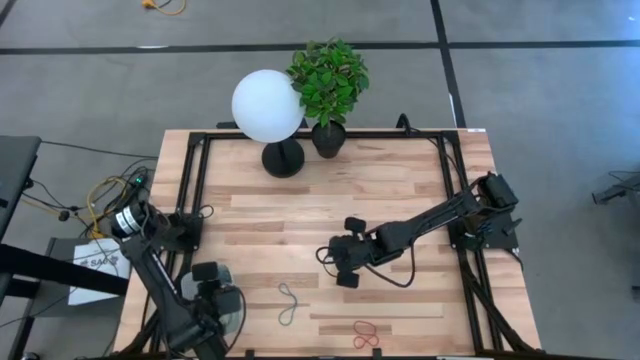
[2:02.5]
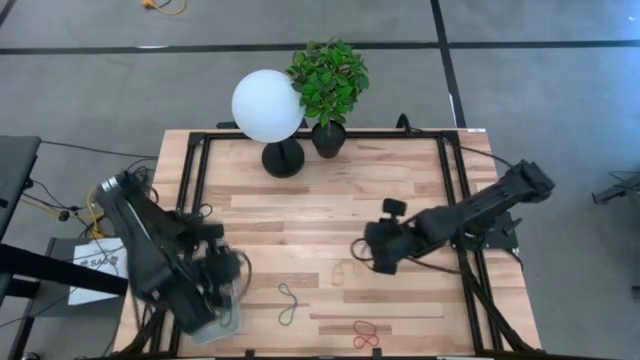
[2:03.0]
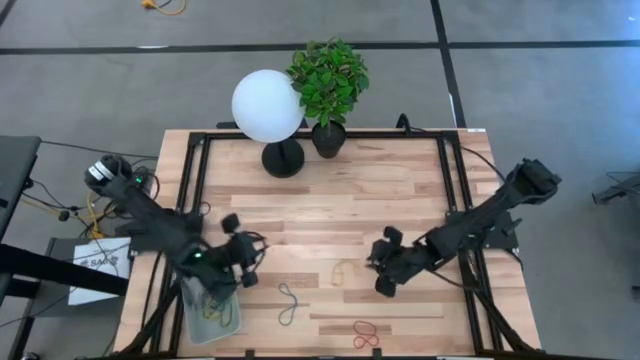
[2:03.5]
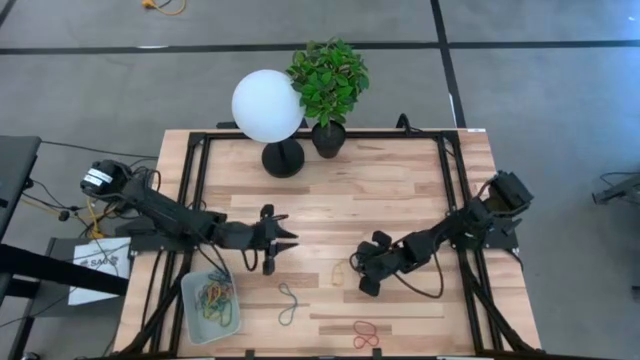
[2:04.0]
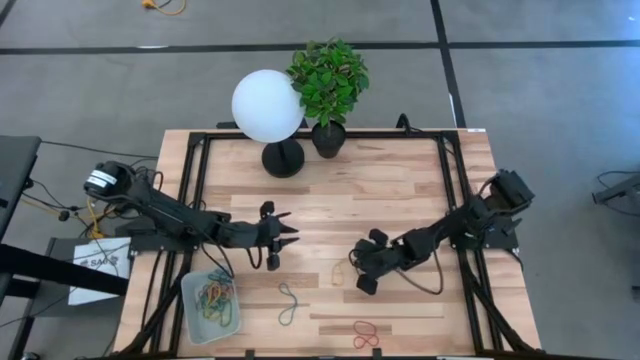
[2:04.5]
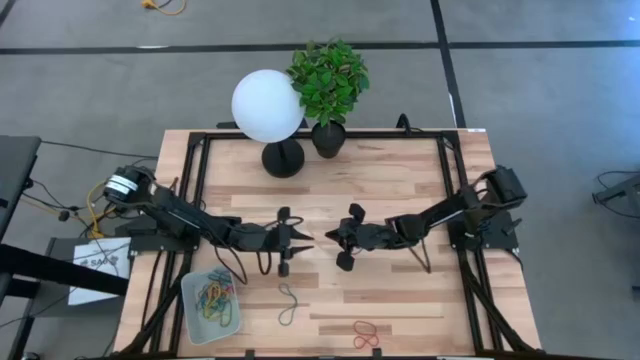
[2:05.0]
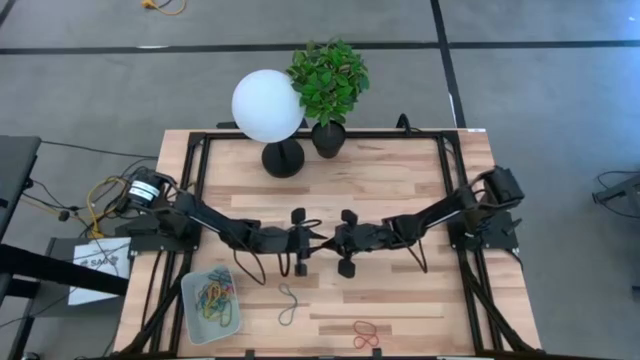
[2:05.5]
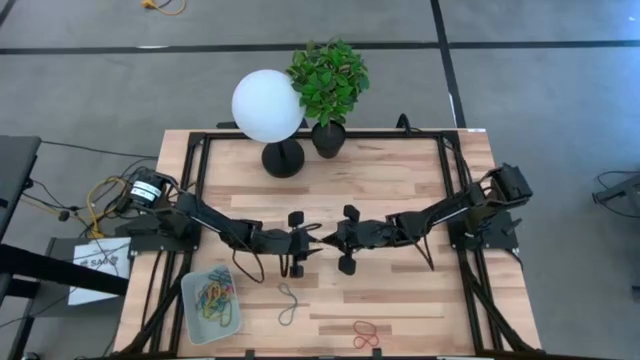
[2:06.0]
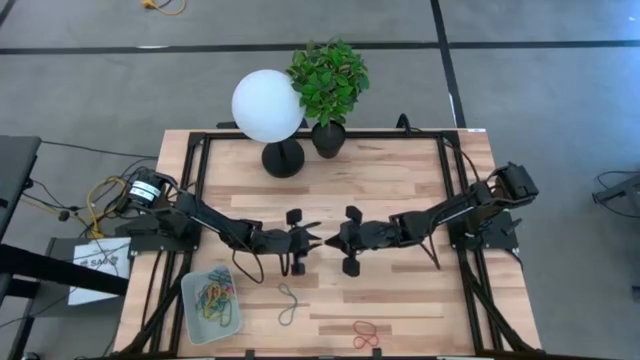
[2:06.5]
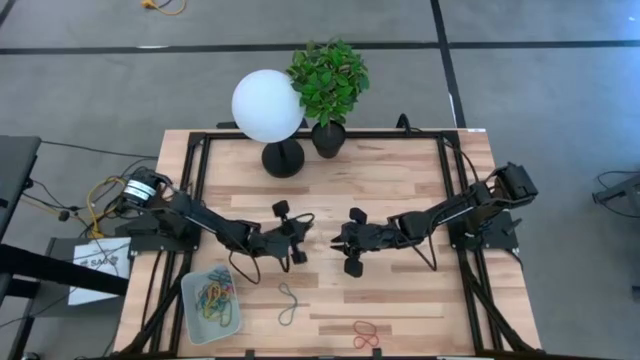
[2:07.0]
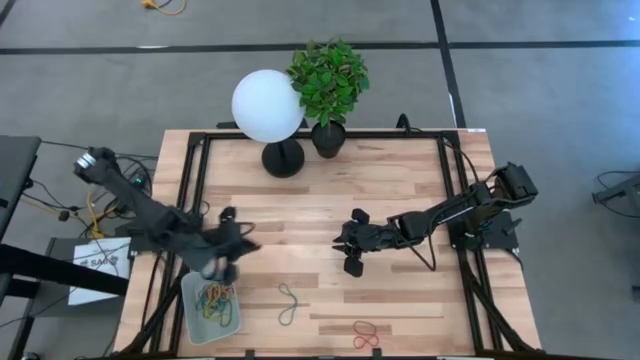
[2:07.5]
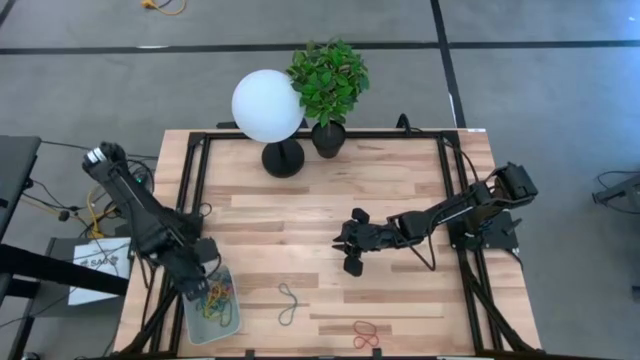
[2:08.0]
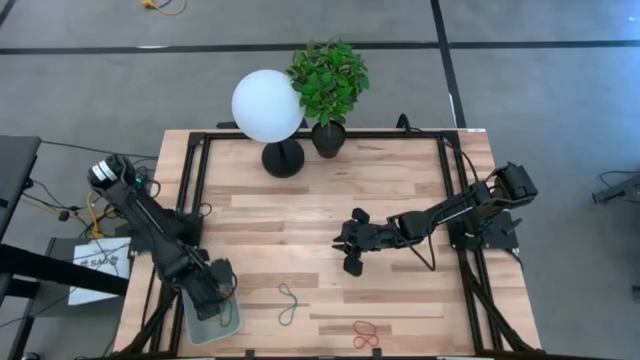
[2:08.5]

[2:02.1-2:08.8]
Task: Pick and place items into bin
Put the yellow rubber band into the gray bin

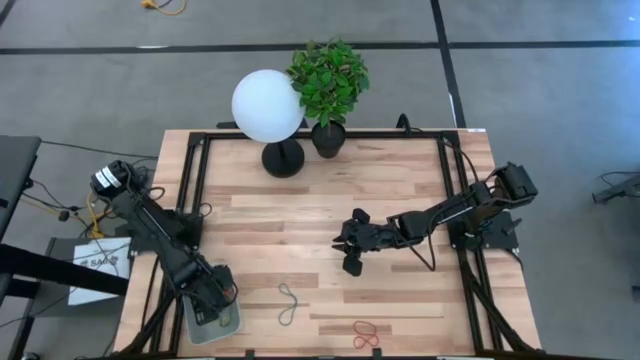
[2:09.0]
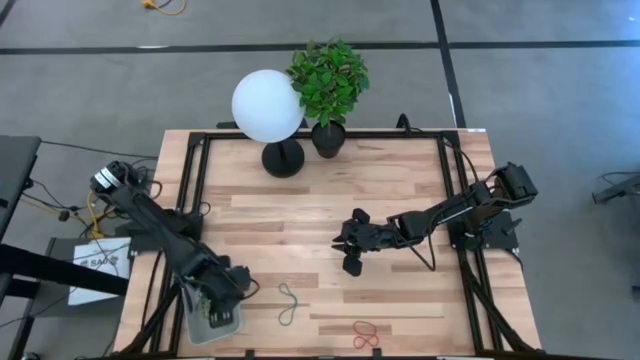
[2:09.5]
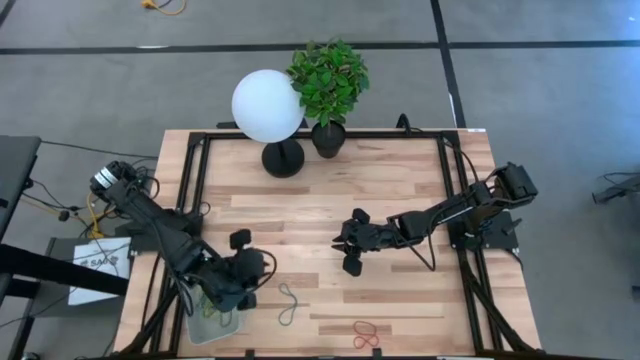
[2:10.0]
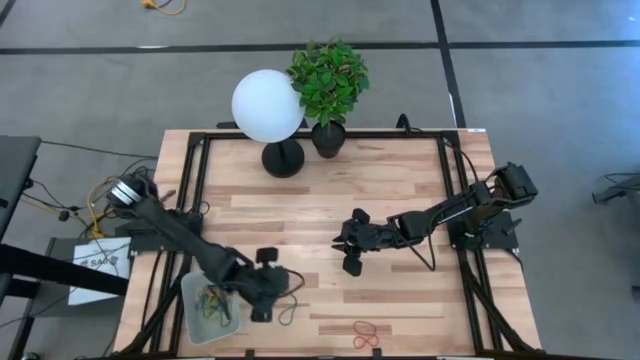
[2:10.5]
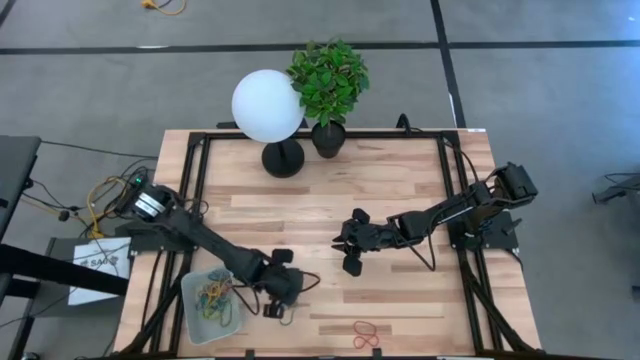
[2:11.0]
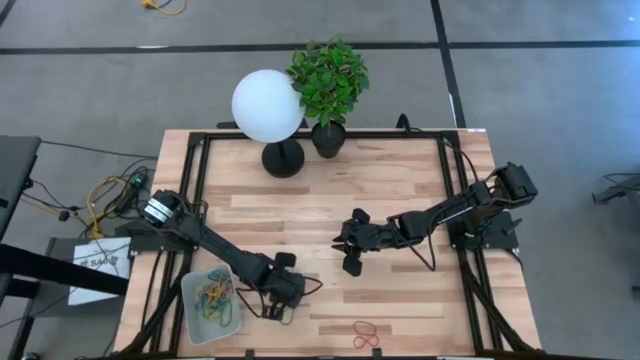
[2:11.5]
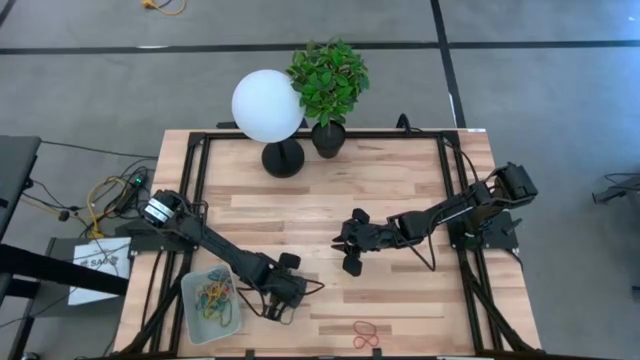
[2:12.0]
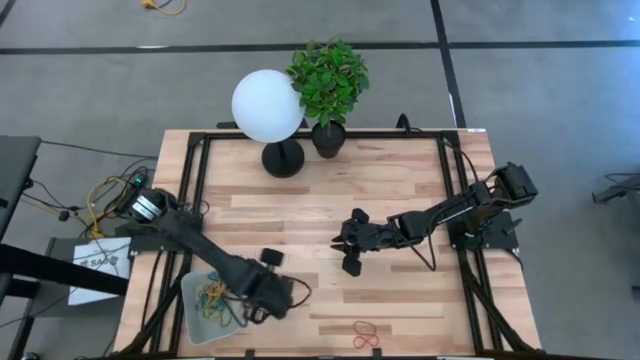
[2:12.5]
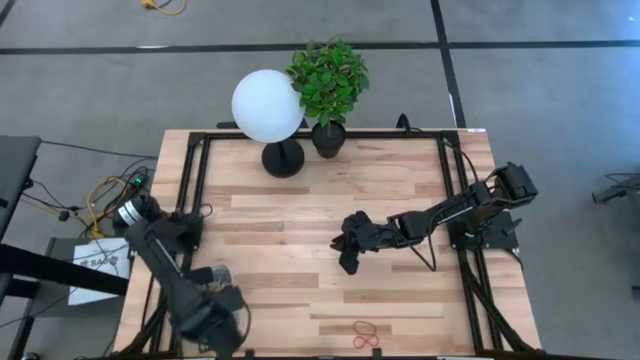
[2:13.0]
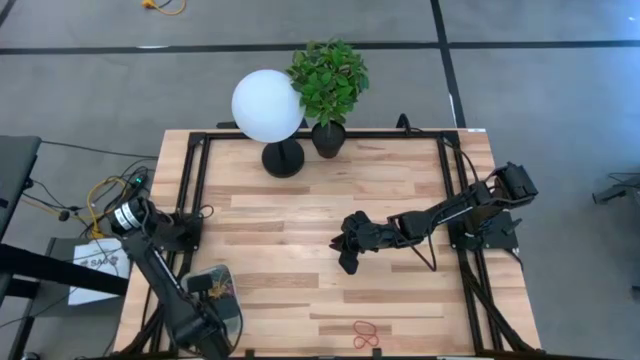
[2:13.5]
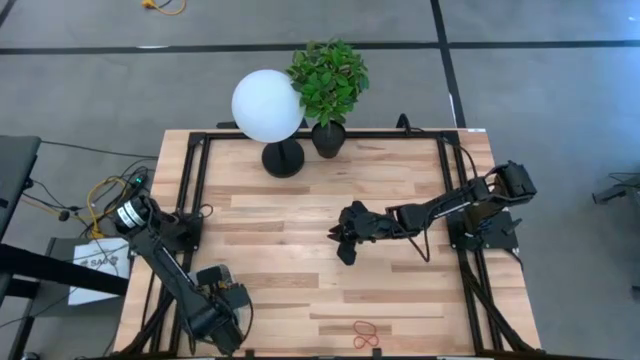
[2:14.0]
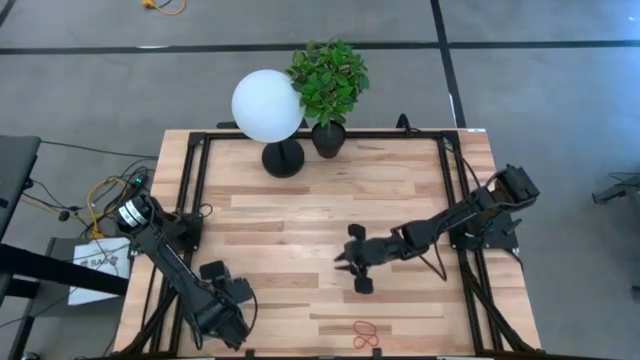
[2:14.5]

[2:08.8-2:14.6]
Put the blue rubber band into the gray bin

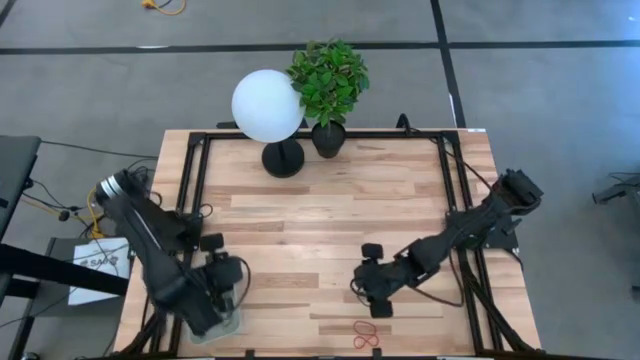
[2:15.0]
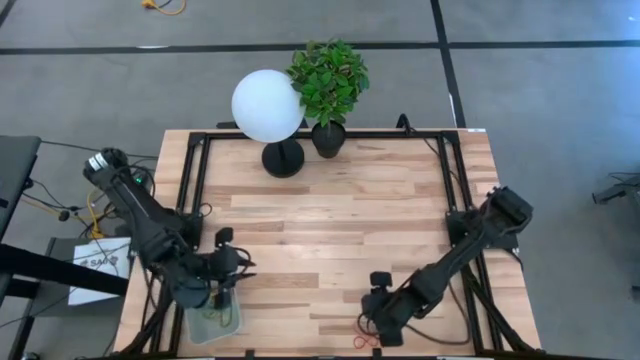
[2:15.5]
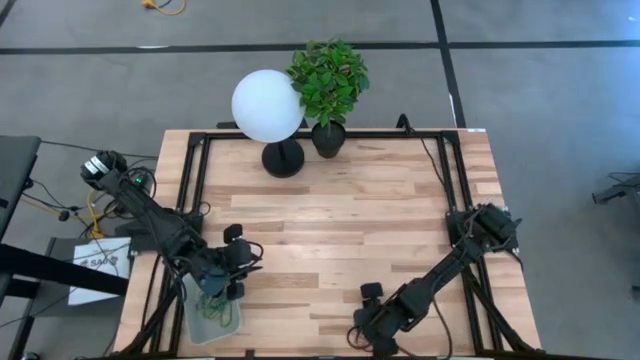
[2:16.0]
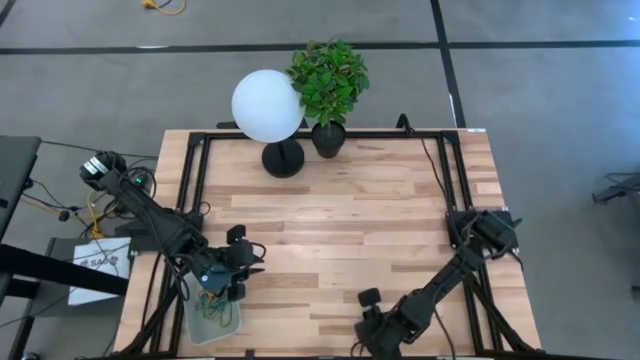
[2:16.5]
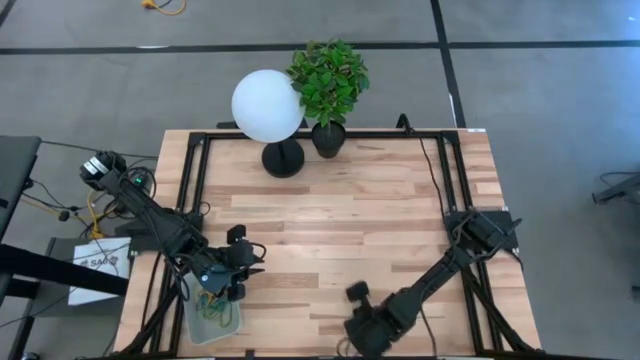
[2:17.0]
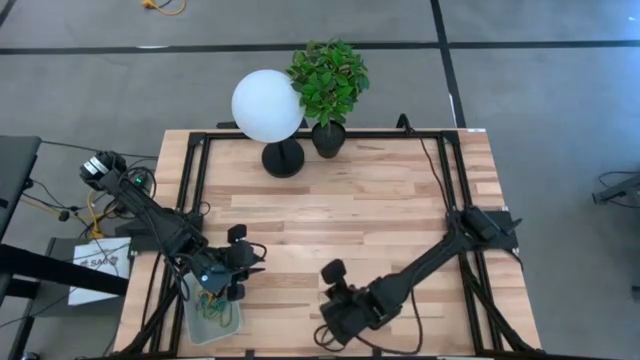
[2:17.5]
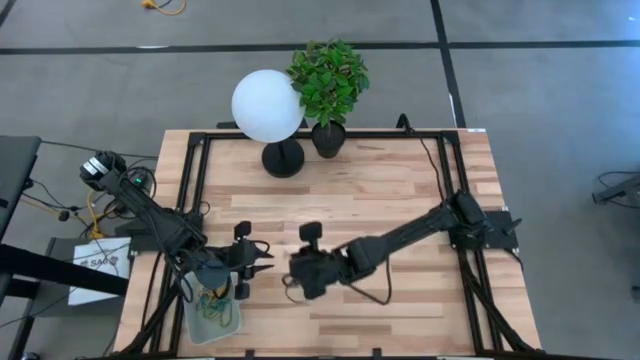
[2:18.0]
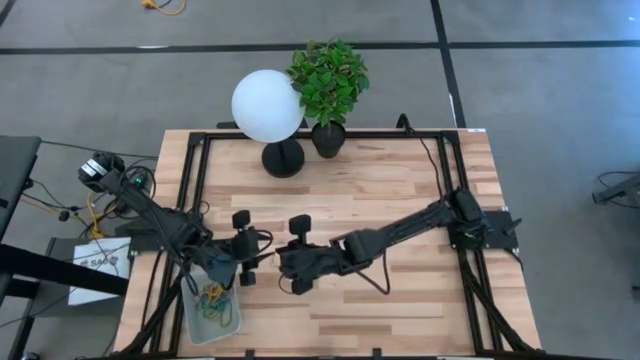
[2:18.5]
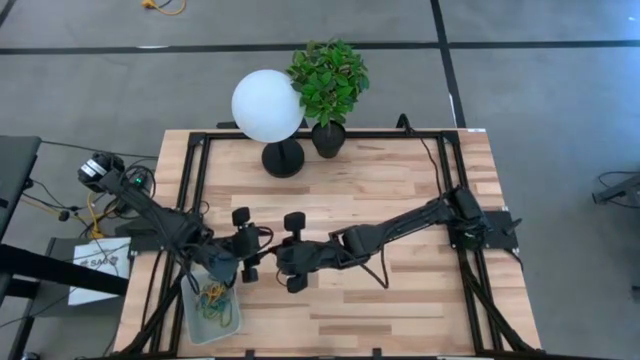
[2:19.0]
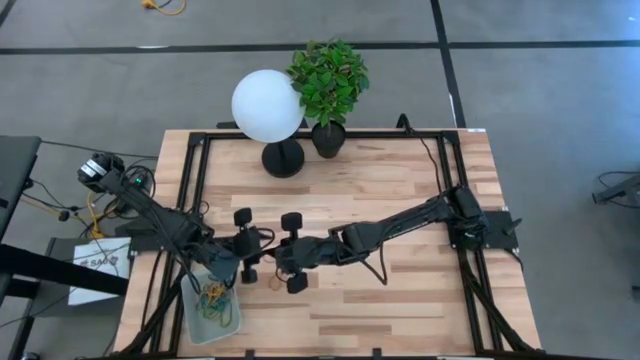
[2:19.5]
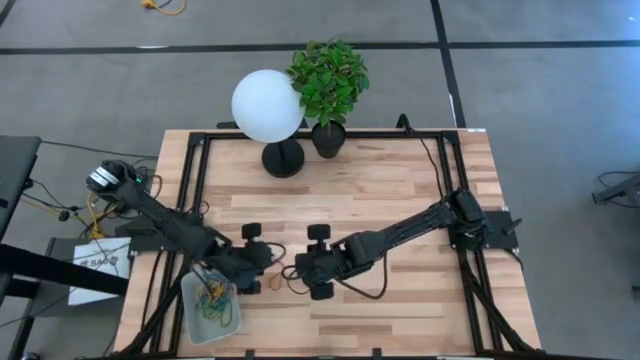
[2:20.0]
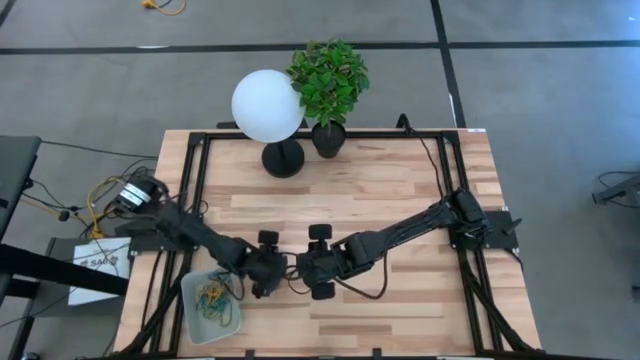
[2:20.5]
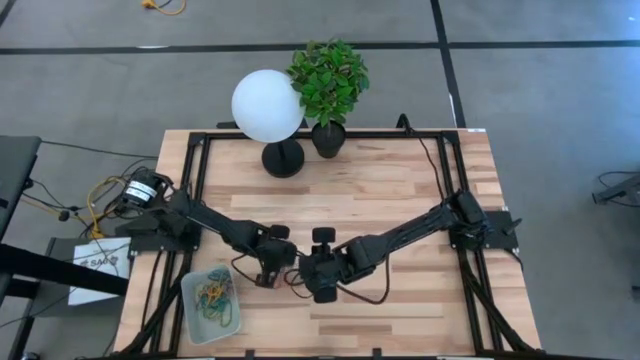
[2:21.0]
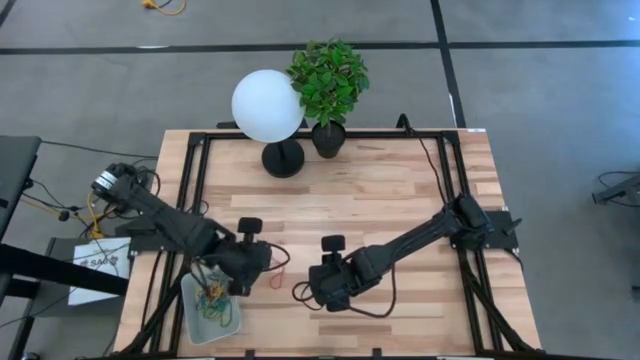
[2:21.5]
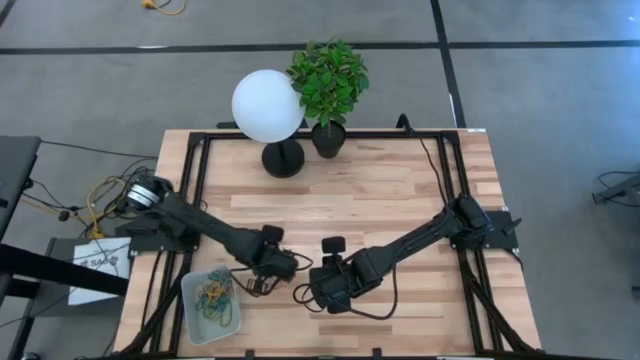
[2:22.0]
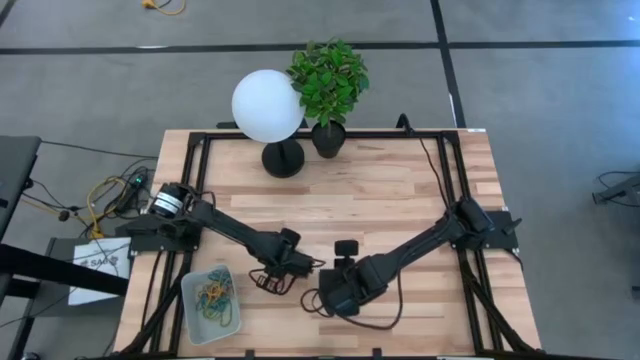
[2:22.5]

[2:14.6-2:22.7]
Put the red rubber band into the gray bin

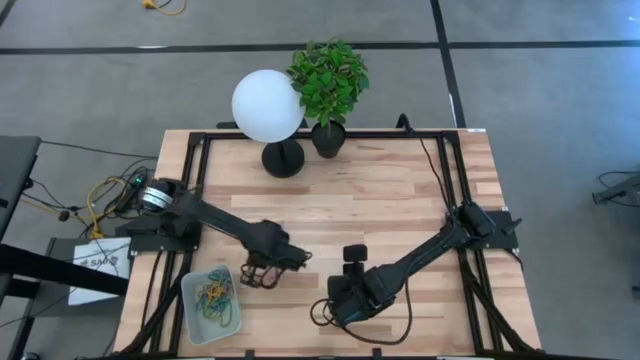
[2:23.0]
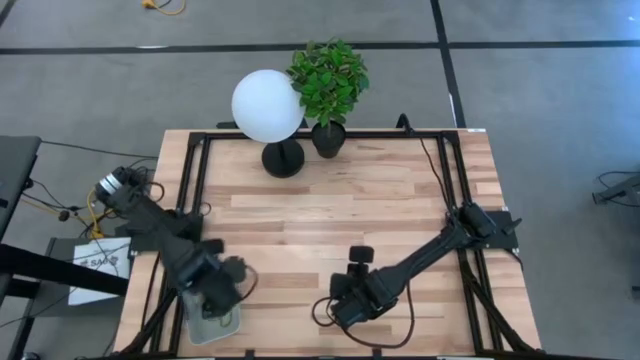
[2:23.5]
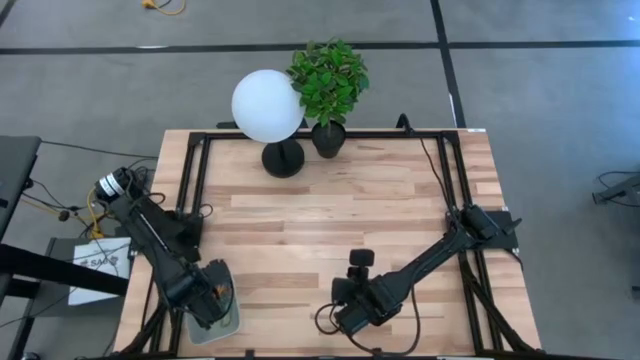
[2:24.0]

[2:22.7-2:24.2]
Put the red rubber band into the gray bin
